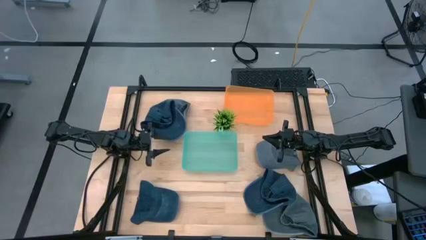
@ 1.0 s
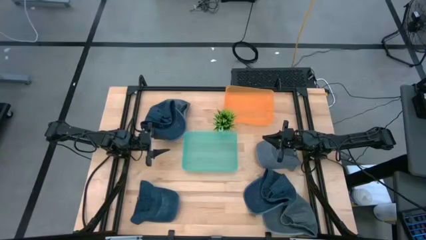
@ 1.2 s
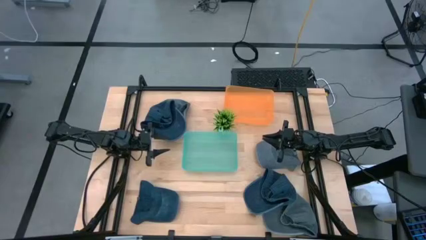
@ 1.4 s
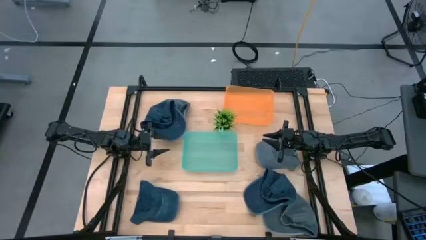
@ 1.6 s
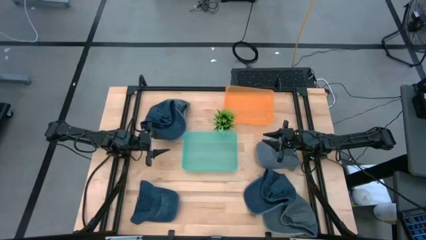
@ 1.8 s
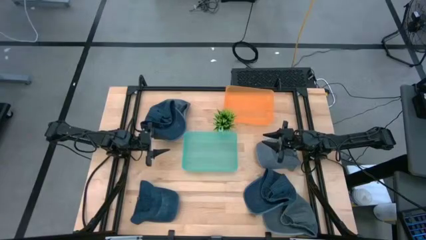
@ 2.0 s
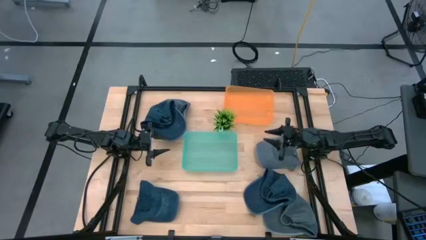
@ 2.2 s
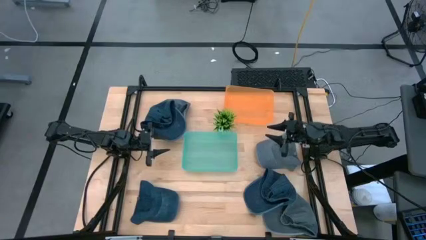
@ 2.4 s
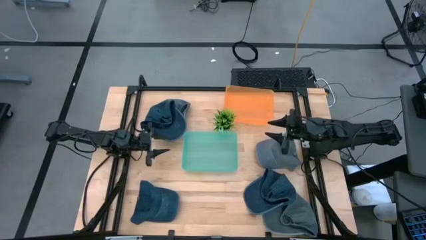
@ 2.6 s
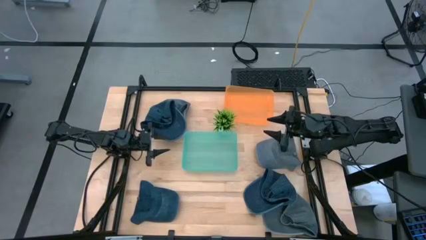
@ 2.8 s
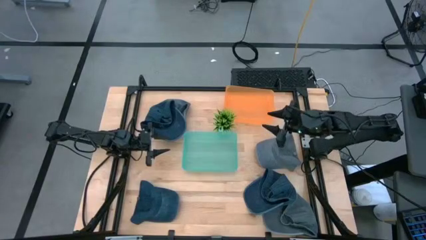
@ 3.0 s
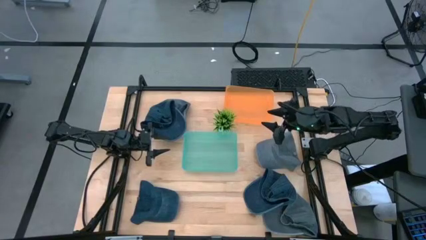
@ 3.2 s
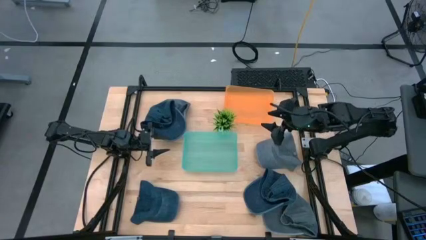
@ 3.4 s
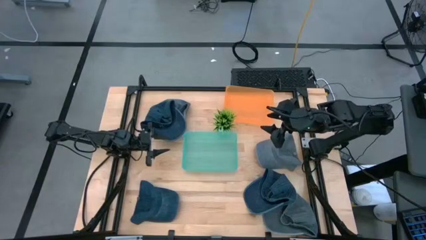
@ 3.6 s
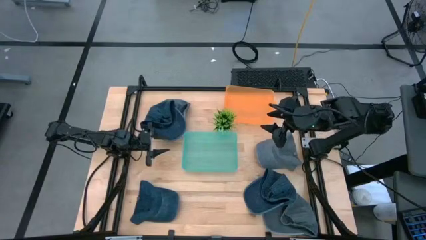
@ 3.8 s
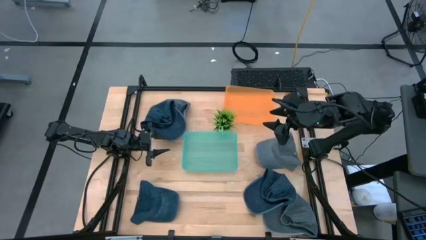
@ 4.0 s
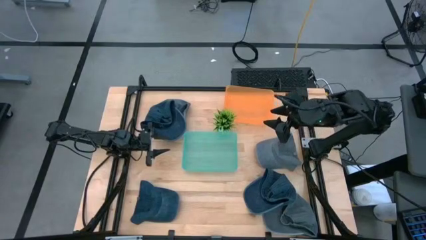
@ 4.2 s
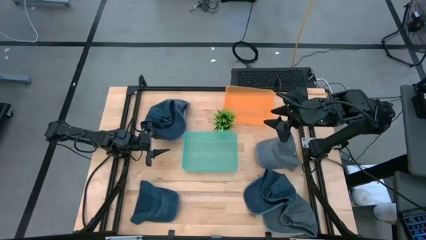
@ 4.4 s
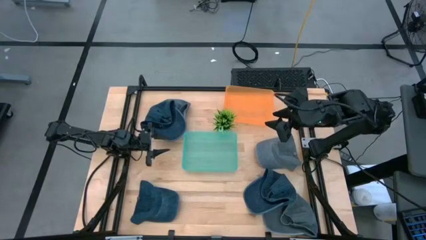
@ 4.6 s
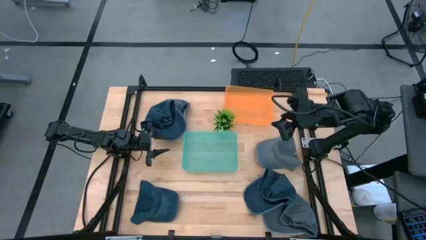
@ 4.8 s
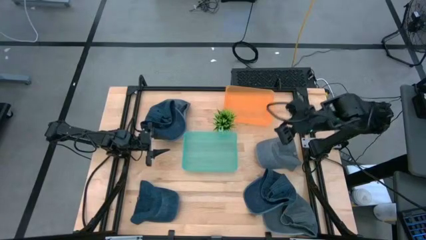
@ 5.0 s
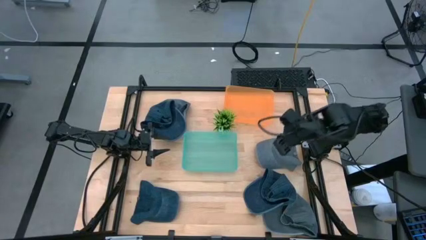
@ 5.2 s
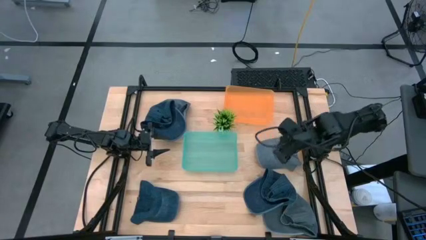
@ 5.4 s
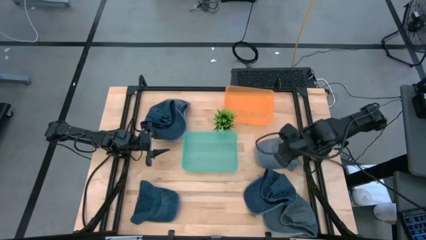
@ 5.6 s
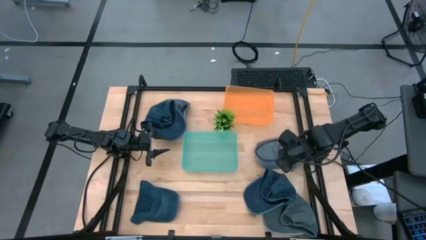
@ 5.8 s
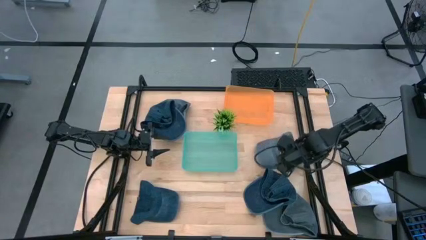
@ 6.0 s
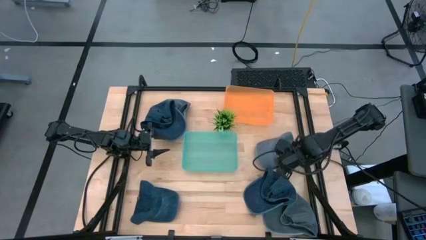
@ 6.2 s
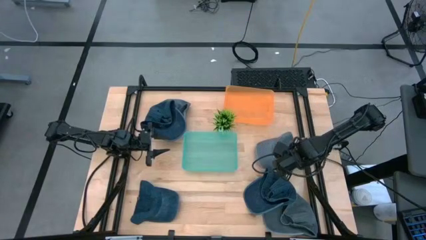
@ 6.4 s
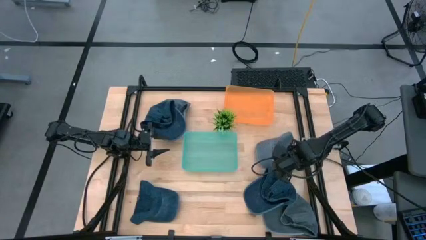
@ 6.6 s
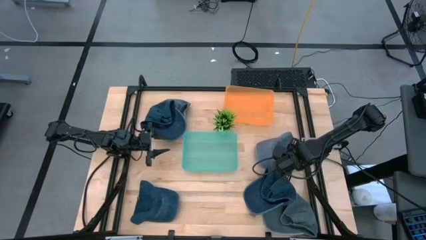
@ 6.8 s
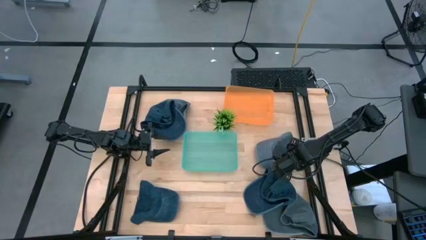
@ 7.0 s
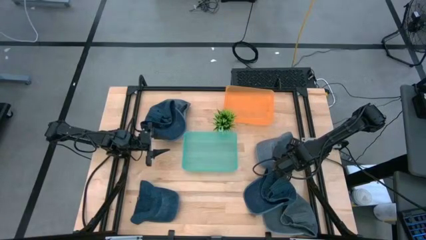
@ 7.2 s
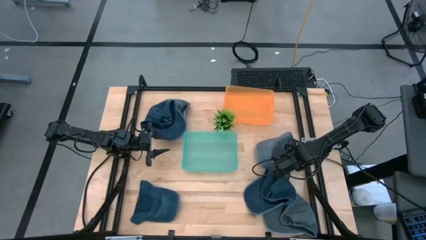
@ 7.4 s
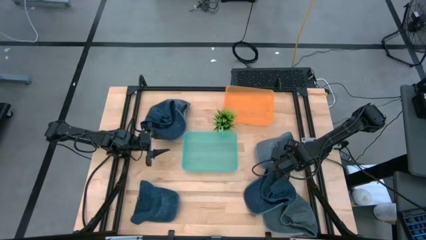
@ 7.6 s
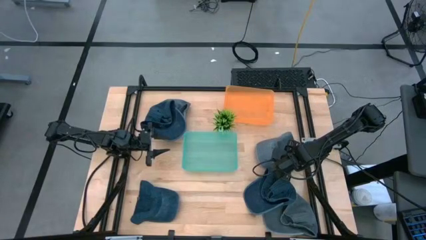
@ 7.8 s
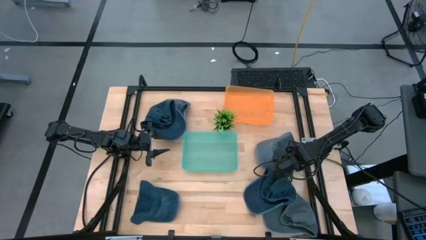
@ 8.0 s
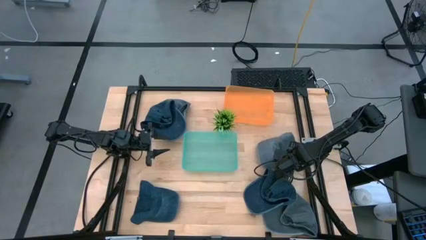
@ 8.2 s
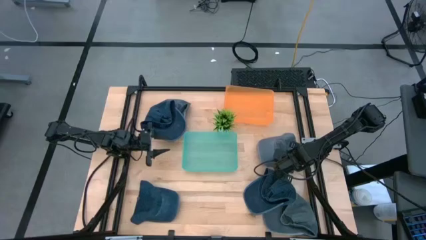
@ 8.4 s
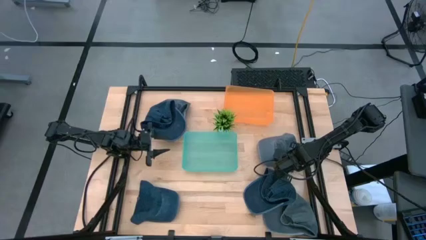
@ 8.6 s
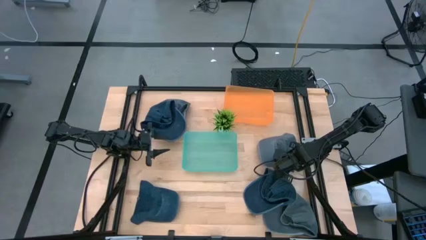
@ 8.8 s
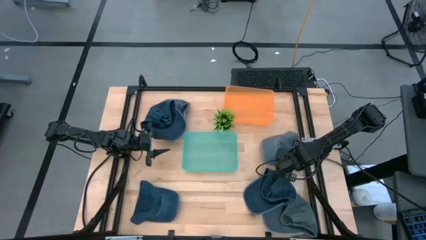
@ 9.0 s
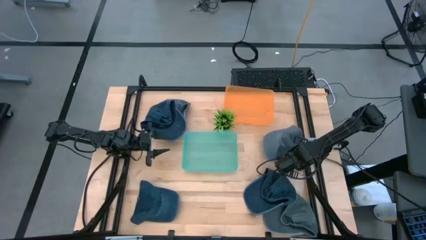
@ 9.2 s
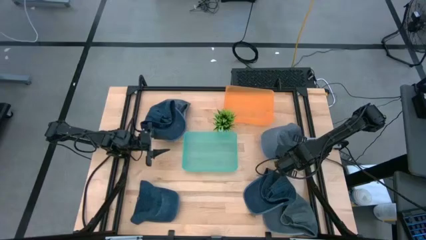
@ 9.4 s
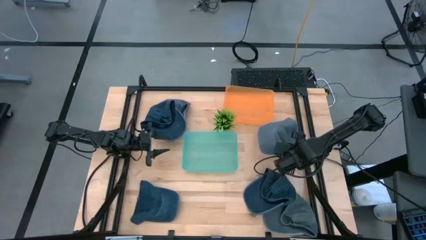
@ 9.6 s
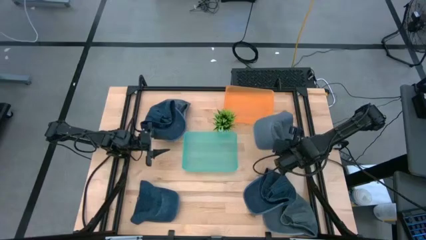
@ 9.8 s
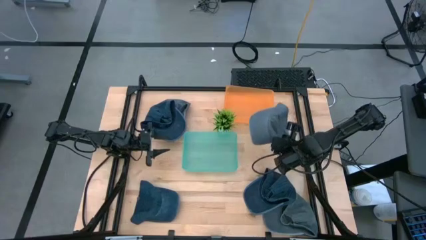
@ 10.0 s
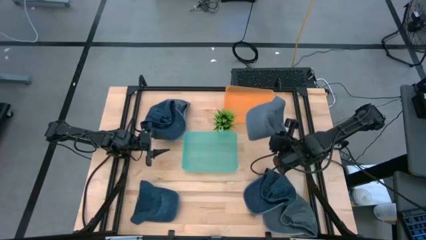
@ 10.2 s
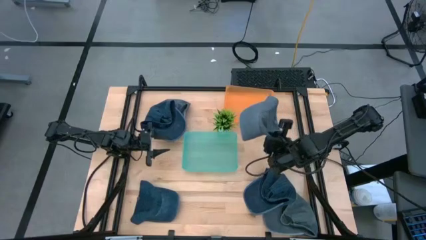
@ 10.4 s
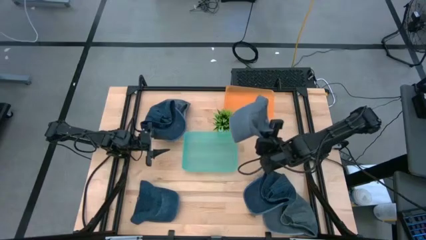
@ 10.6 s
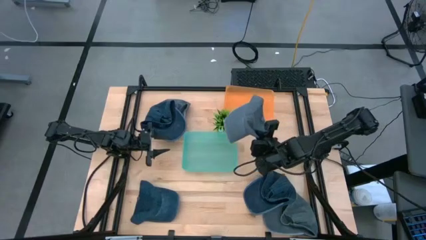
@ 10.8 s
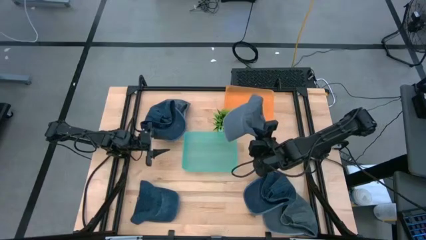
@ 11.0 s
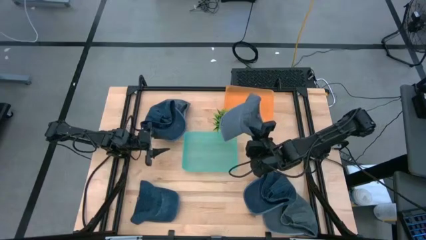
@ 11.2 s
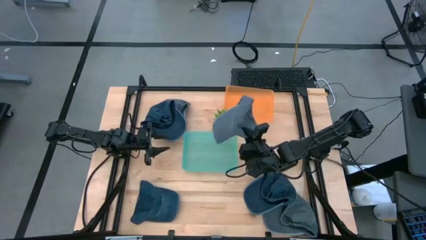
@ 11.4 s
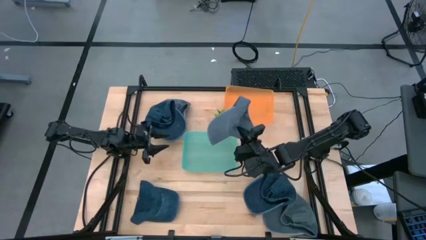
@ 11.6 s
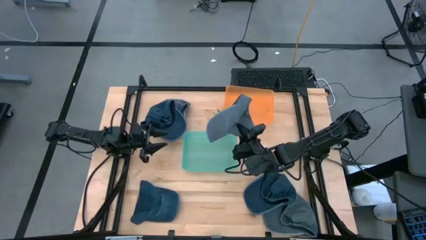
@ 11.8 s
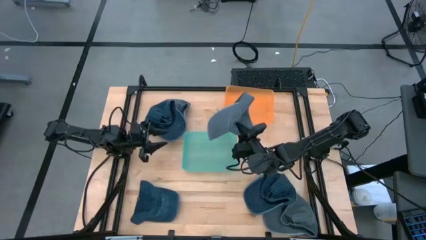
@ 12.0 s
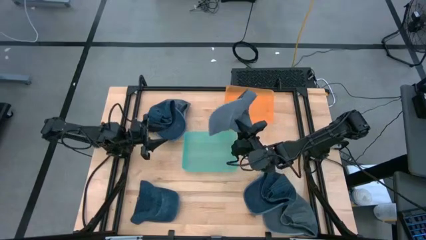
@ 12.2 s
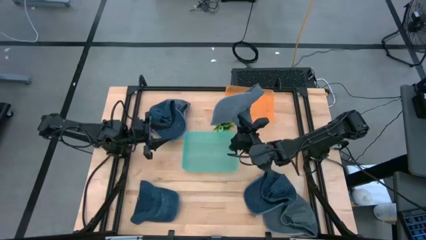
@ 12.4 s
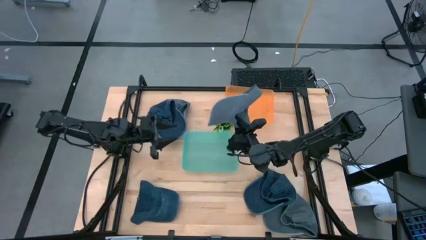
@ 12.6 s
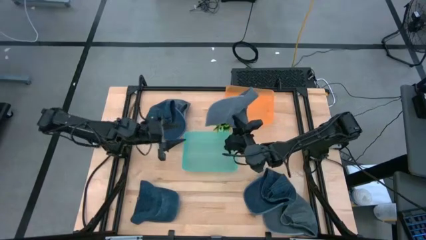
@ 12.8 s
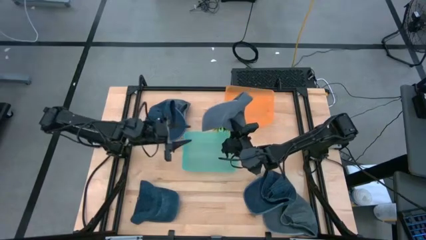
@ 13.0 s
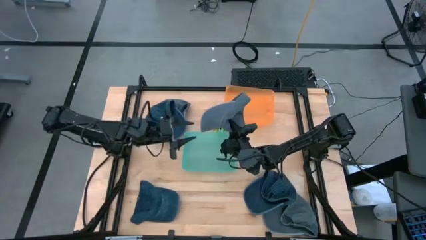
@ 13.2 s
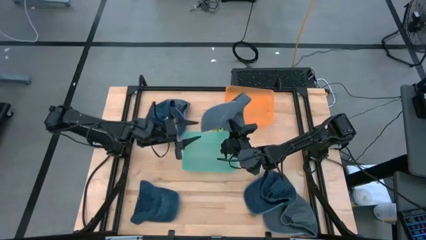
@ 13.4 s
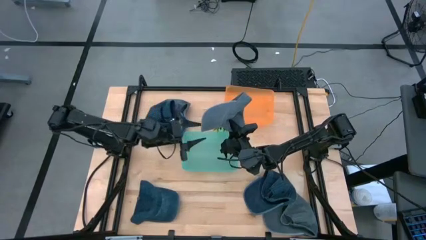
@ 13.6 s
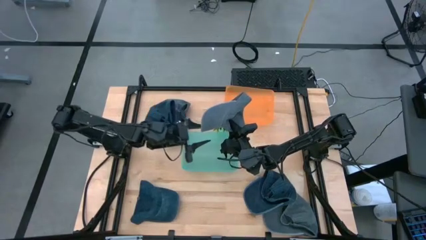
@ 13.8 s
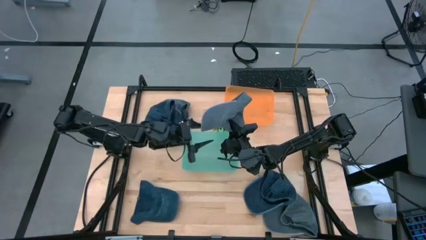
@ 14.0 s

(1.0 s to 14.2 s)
Task: Pick & Place hat
Put the middle gray cap into the orange bin
